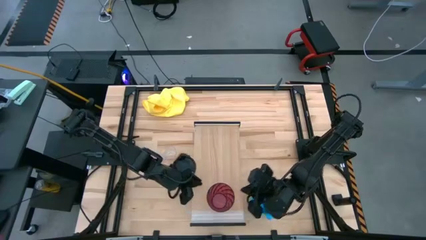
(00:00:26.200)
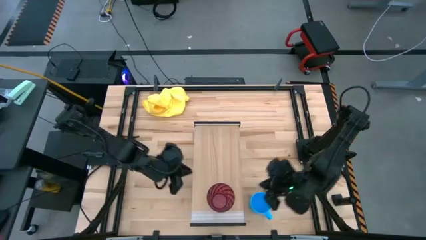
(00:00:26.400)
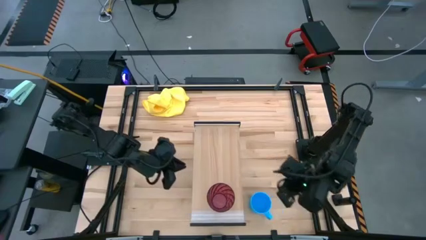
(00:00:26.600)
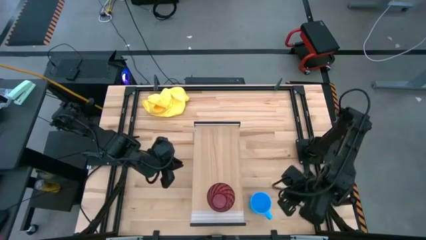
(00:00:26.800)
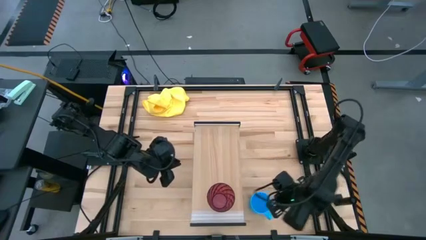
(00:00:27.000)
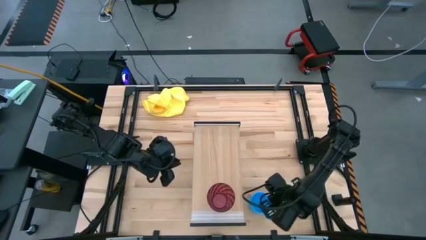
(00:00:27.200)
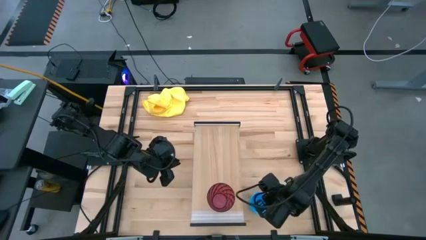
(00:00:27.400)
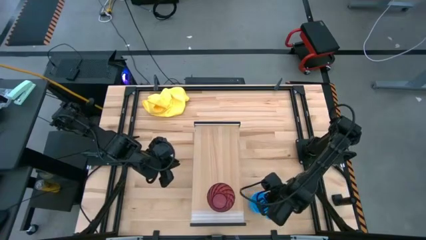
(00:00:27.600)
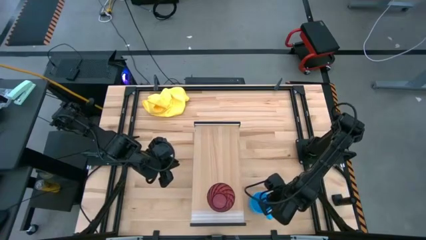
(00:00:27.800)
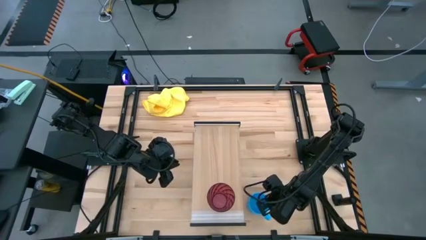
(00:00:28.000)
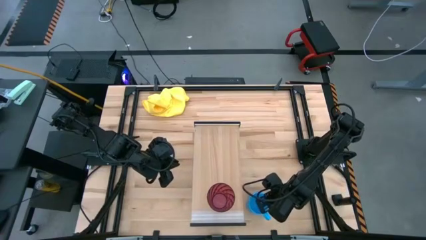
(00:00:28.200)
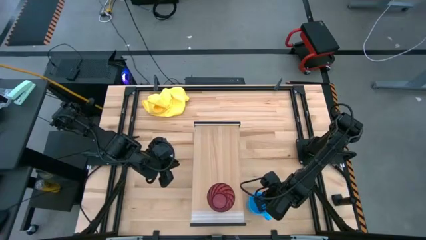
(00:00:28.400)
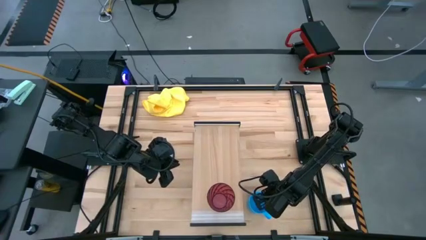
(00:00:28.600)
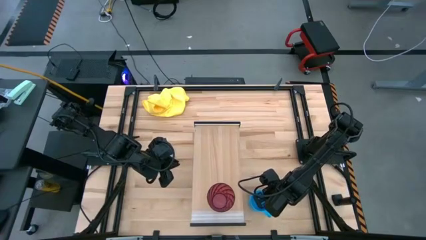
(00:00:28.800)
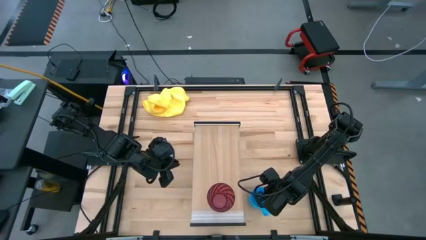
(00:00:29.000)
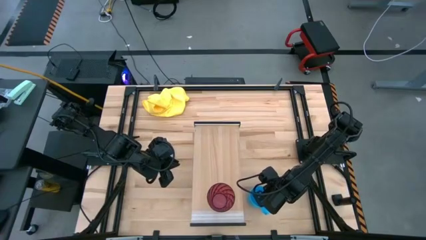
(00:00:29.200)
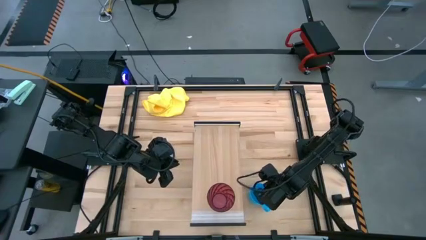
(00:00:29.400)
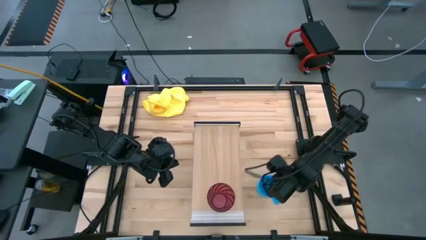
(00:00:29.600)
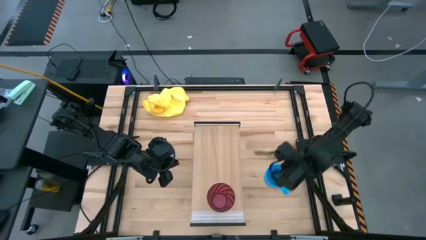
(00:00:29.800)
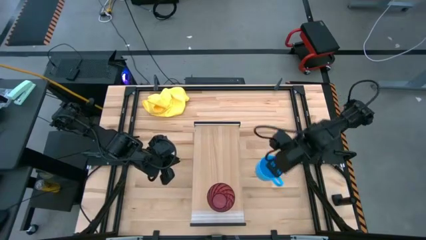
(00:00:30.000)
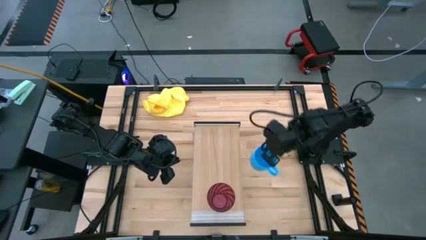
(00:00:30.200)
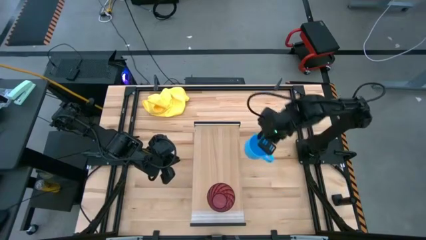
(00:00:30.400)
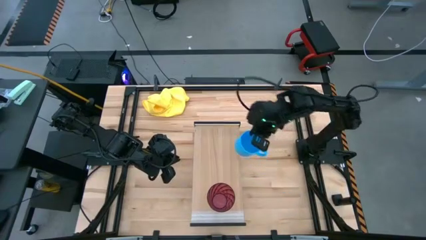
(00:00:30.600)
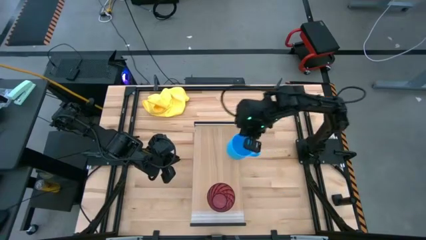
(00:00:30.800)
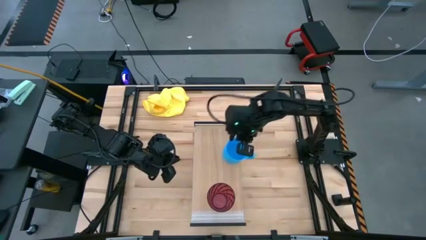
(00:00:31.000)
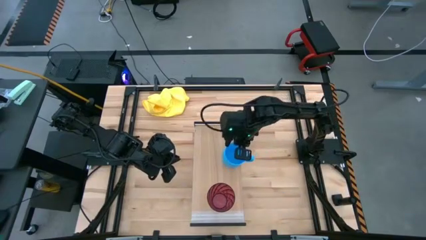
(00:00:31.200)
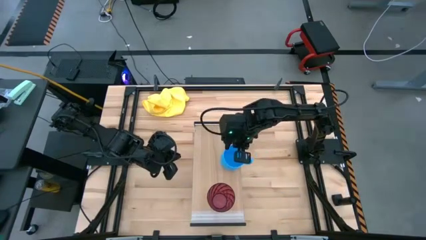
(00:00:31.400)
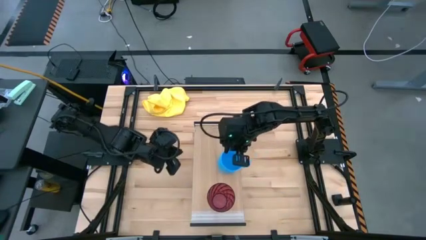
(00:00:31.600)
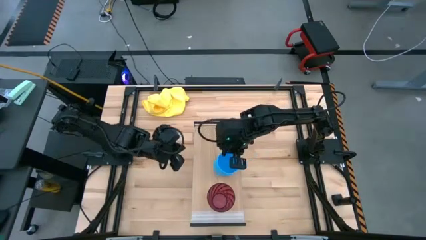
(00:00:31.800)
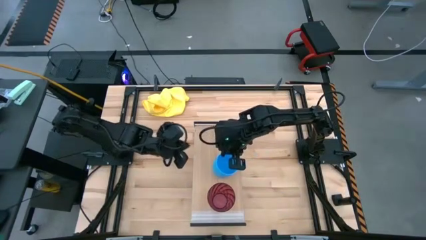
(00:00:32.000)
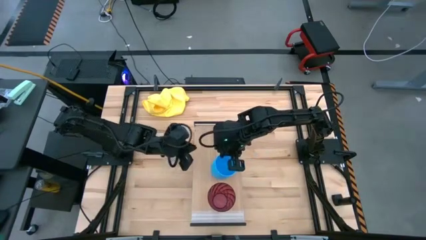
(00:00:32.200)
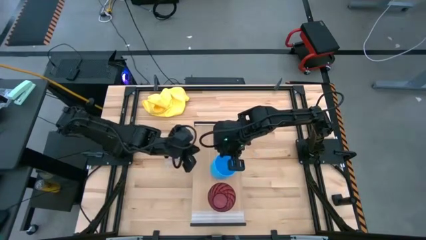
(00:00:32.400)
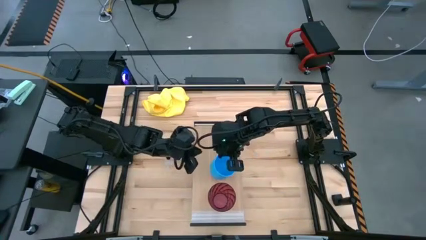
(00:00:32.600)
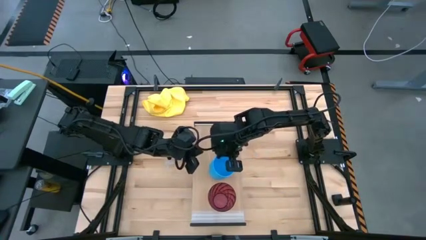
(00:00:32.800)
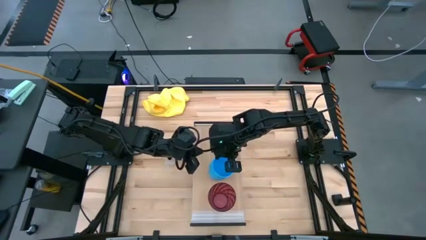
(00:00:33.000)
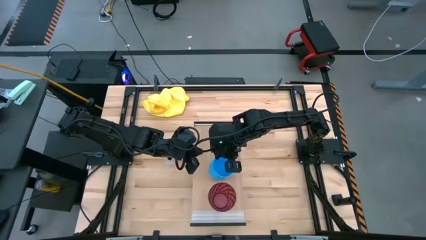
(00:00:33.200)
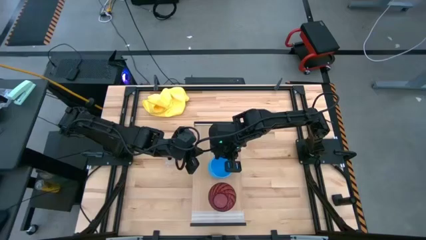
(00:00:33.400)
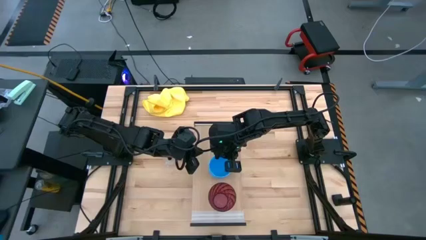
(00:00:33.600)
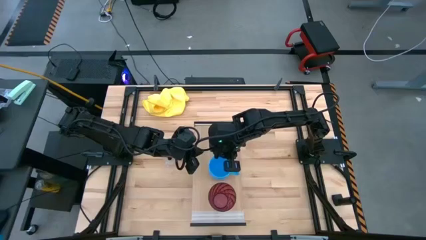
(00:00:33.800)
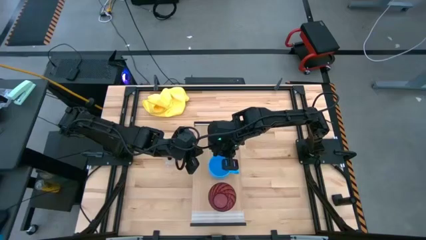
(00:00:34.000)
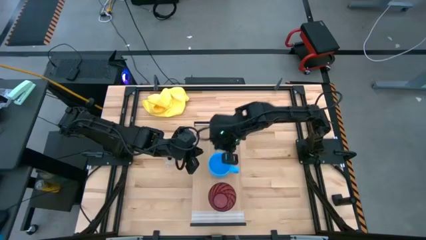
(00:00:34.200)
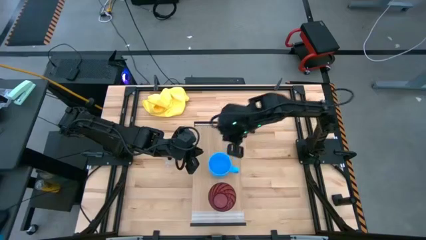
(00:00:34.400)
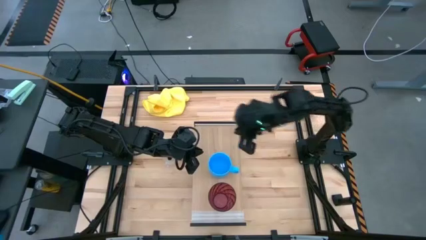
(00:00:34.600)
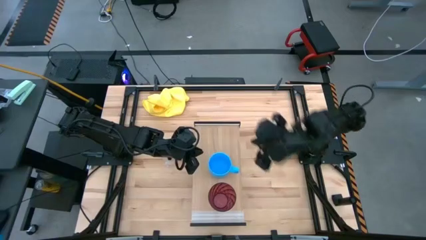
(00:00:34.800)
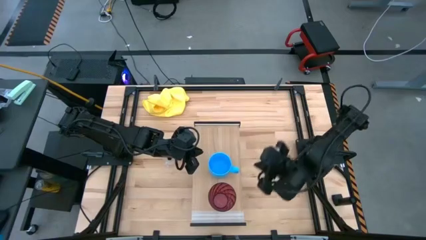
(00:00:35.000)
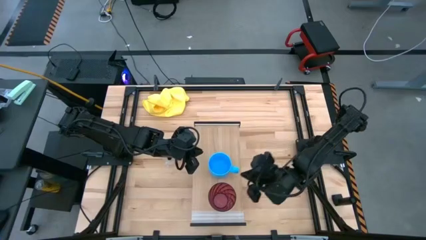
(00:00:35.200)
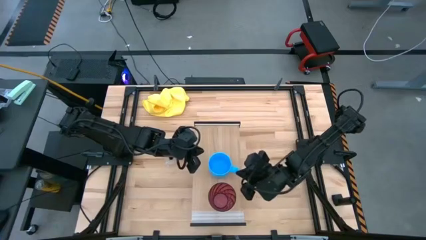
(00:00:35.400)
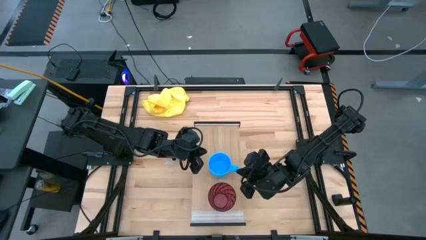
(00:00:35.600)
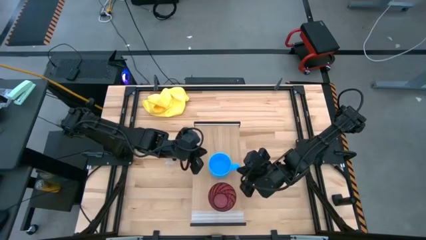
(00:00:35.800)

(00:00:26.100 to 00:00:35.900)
Task: Stack small to large cups/mugs on shelf
Put the blue cup on the shelf
